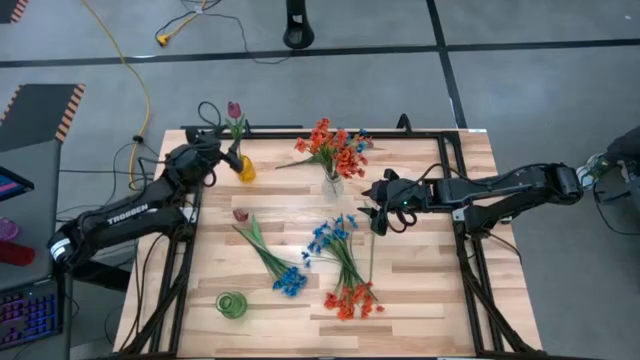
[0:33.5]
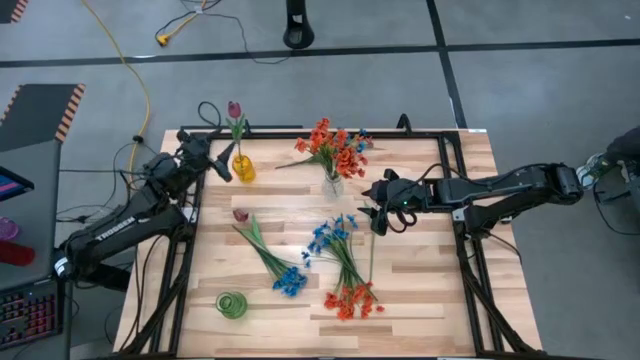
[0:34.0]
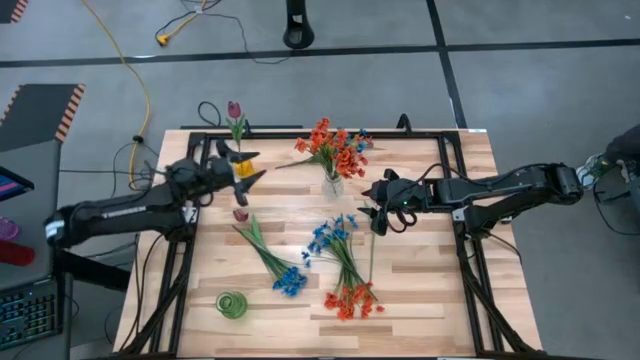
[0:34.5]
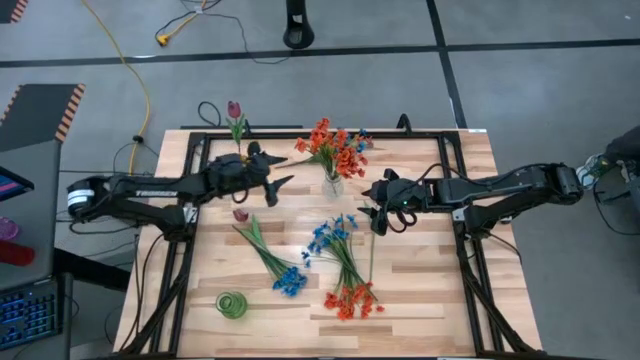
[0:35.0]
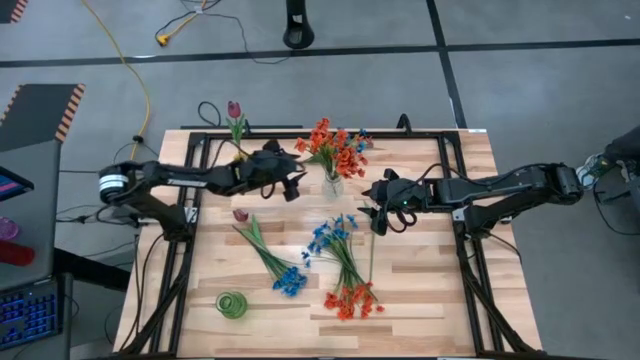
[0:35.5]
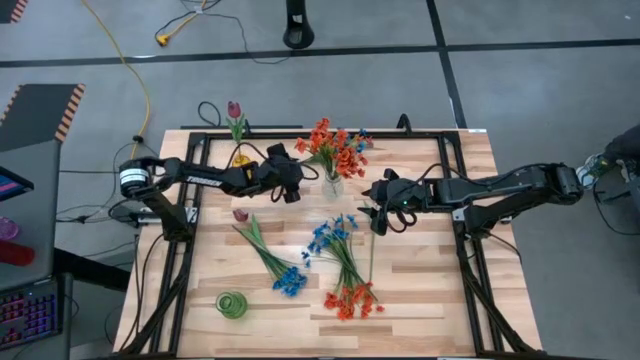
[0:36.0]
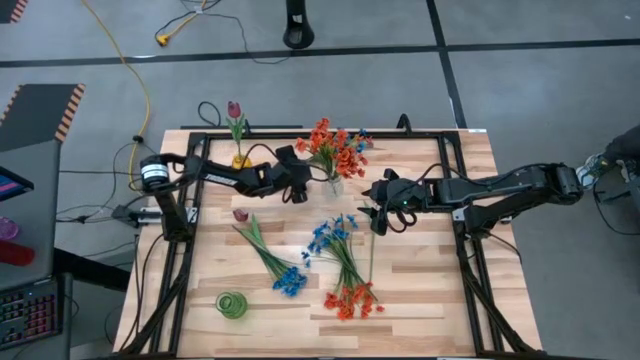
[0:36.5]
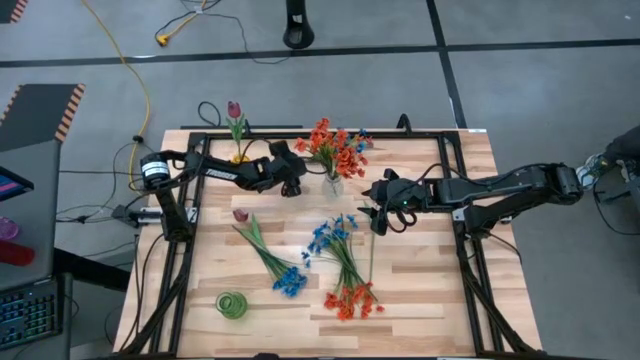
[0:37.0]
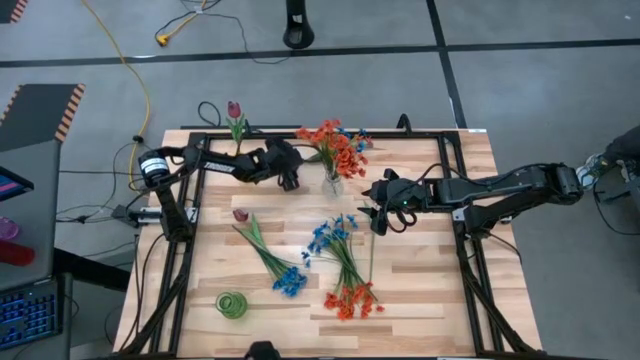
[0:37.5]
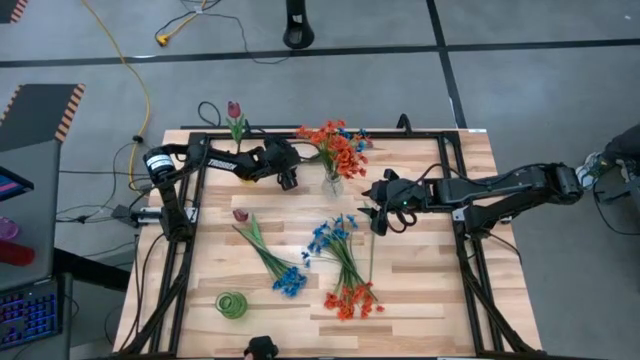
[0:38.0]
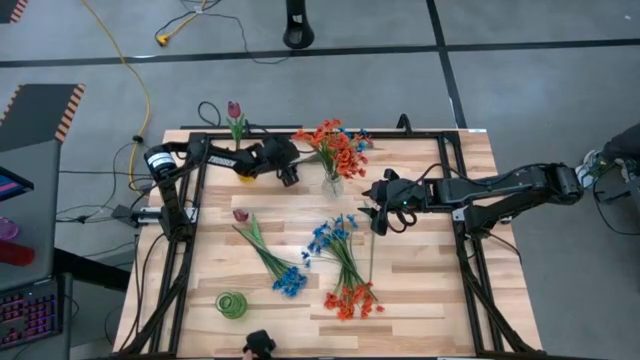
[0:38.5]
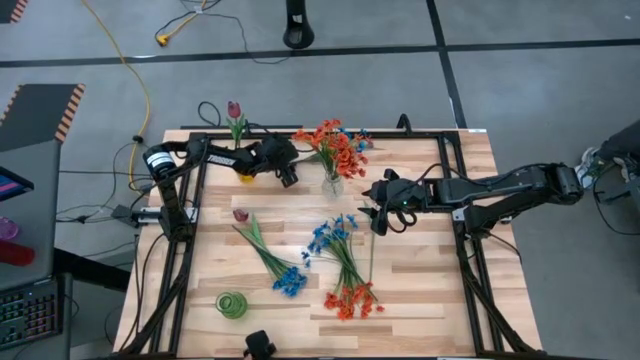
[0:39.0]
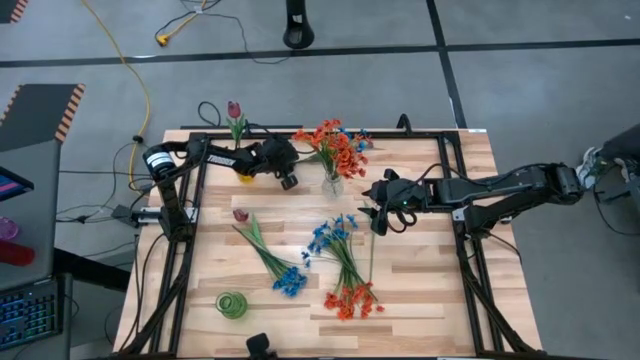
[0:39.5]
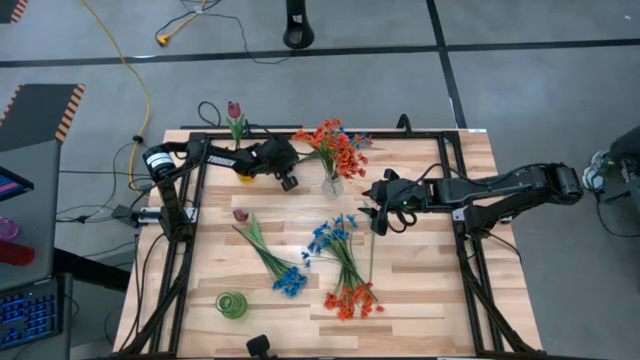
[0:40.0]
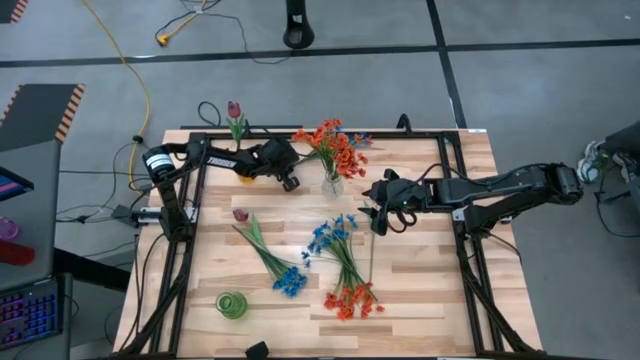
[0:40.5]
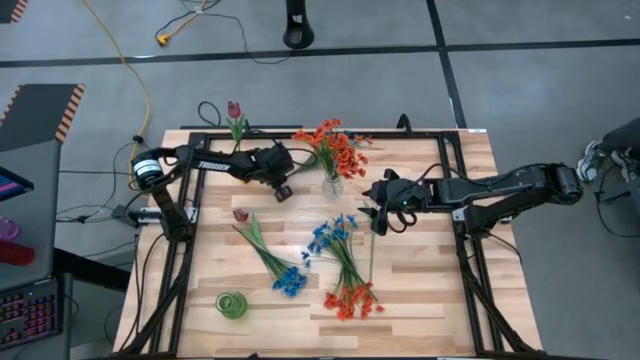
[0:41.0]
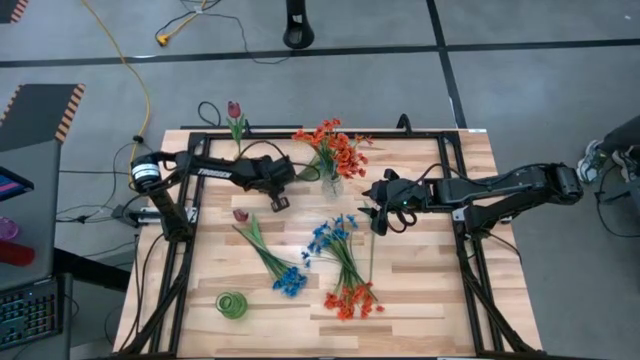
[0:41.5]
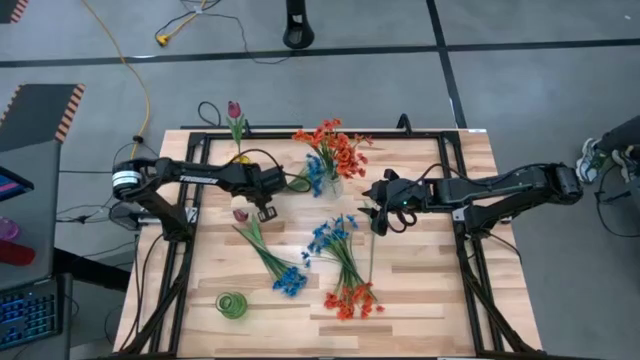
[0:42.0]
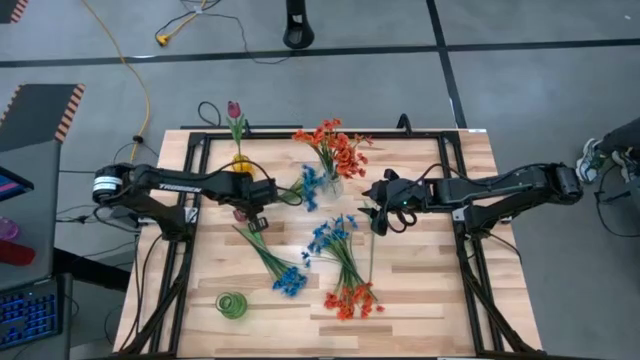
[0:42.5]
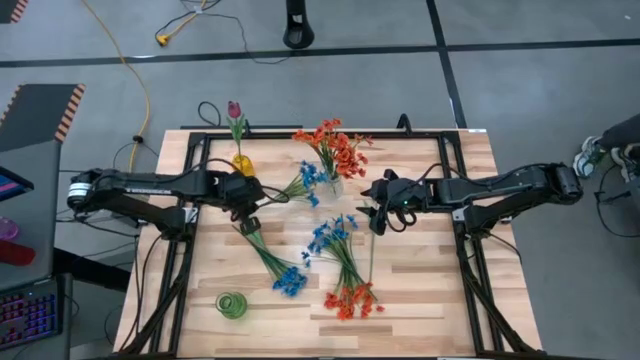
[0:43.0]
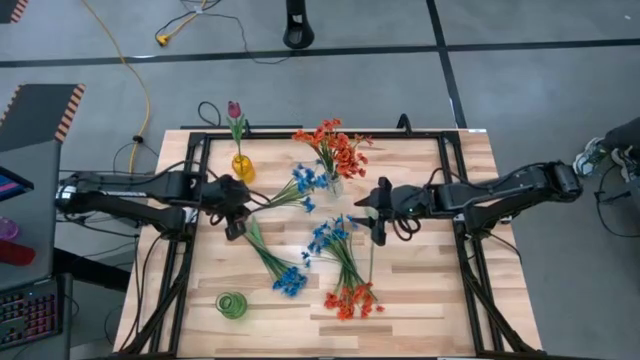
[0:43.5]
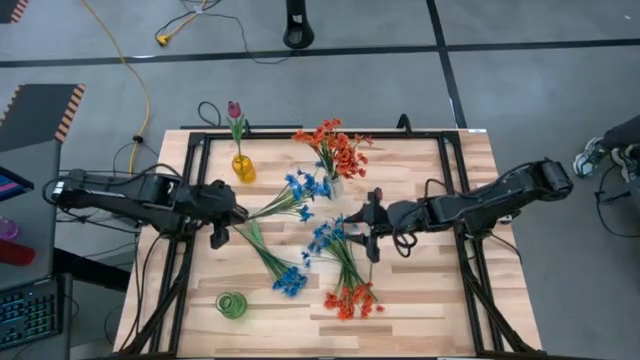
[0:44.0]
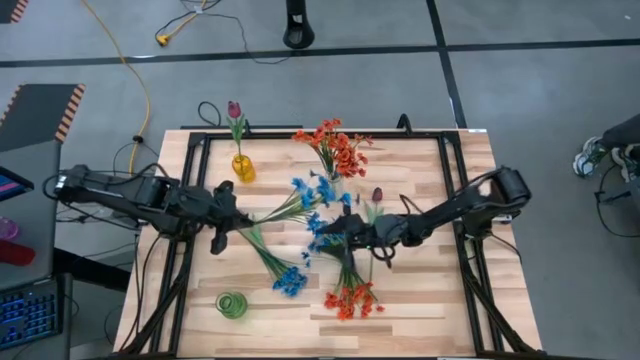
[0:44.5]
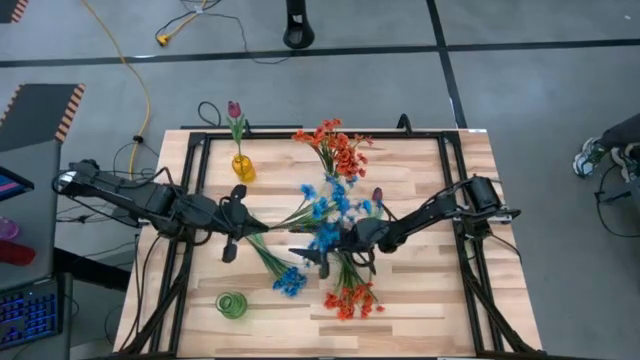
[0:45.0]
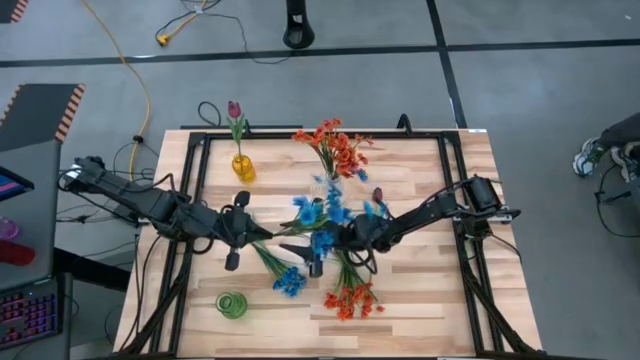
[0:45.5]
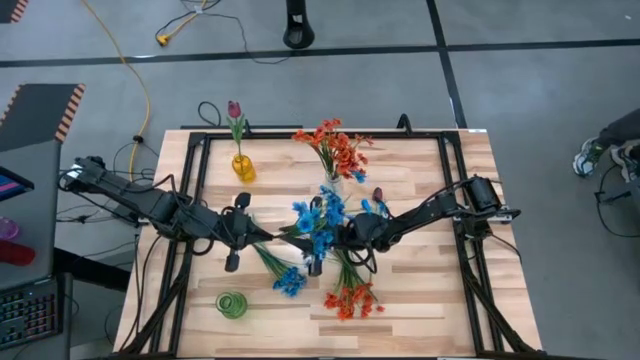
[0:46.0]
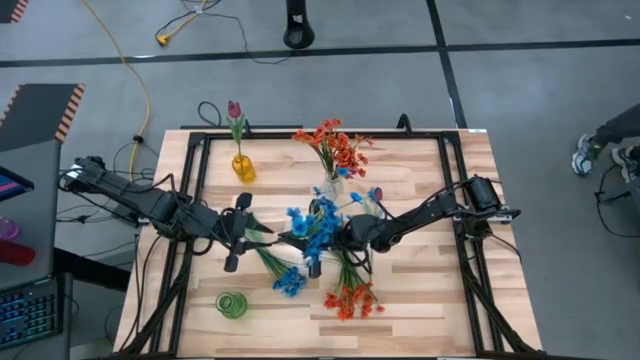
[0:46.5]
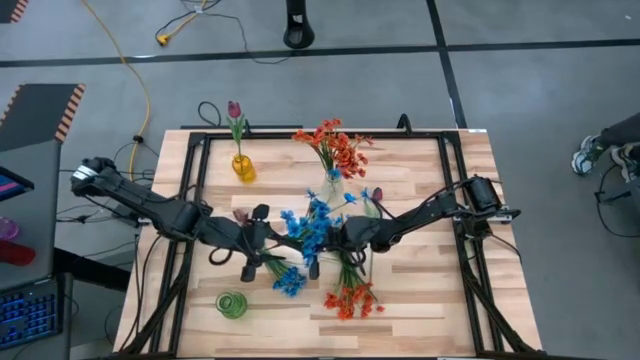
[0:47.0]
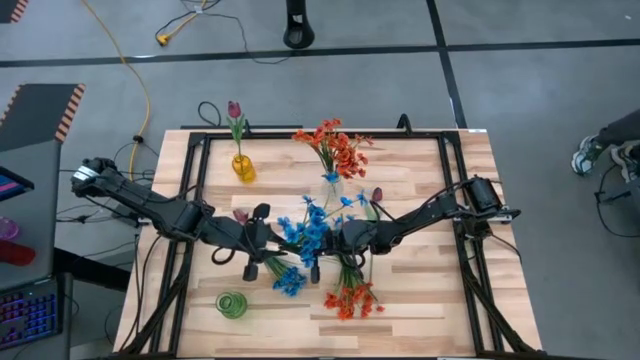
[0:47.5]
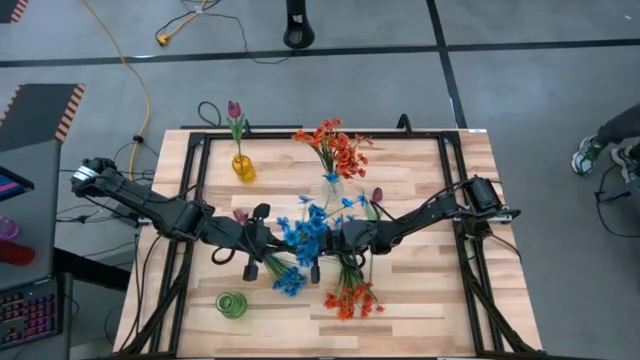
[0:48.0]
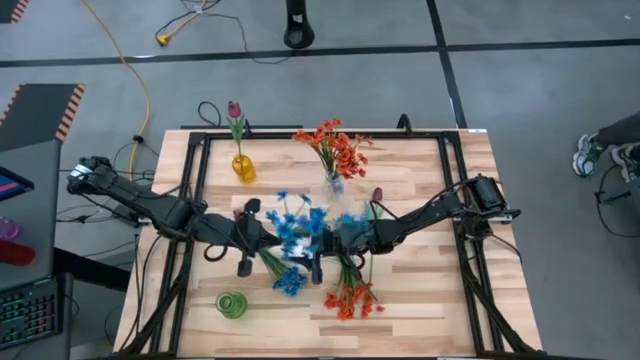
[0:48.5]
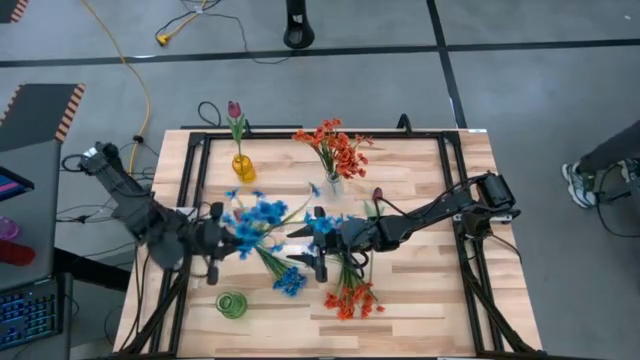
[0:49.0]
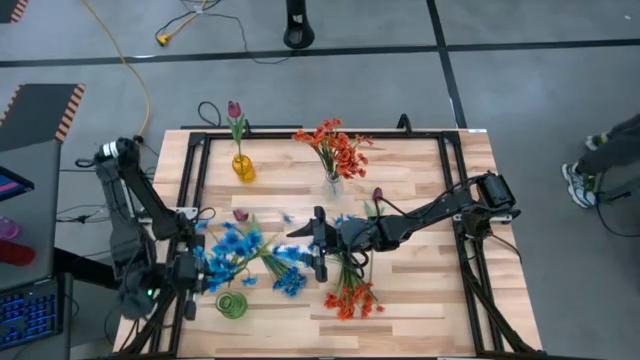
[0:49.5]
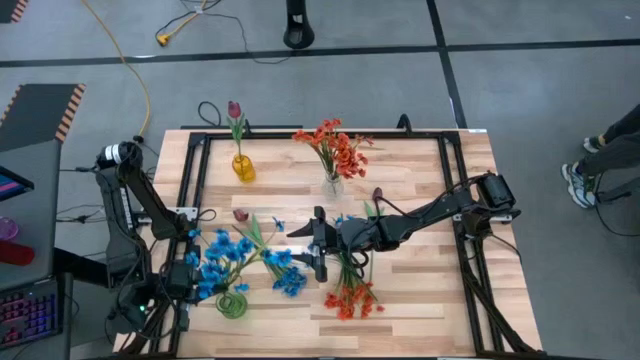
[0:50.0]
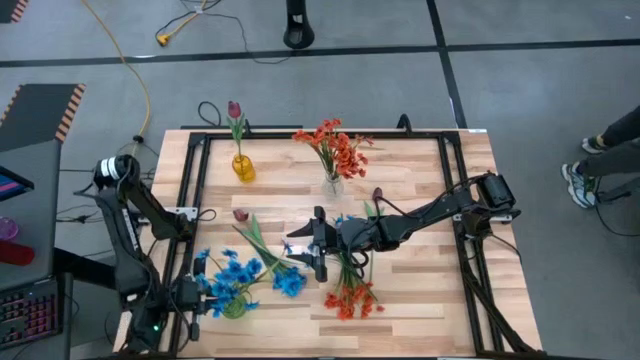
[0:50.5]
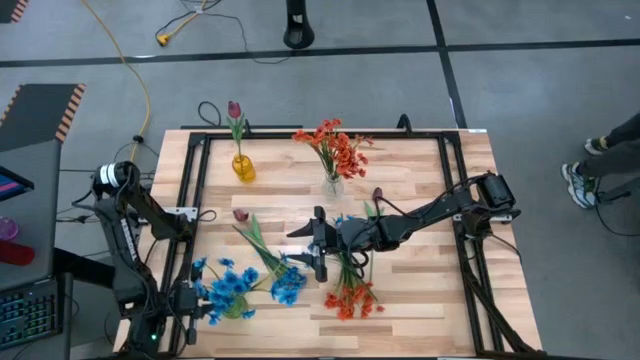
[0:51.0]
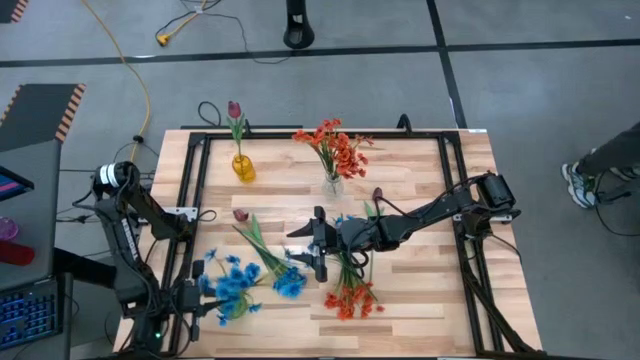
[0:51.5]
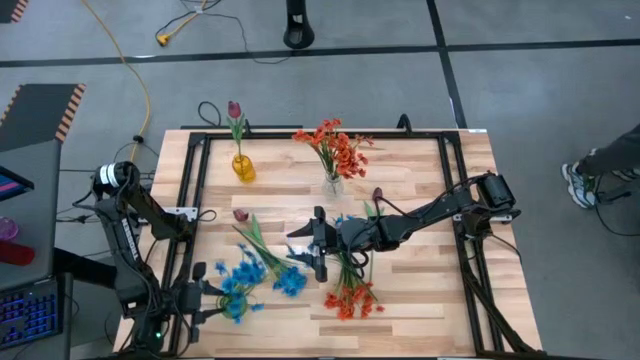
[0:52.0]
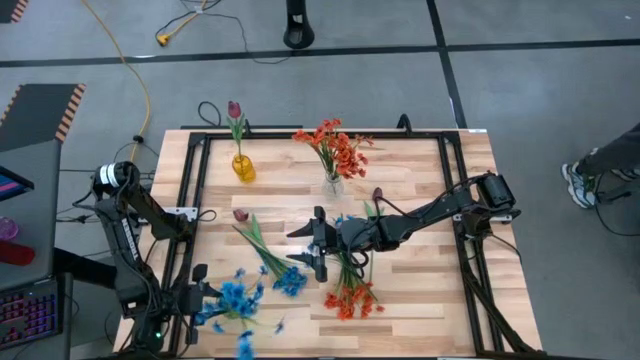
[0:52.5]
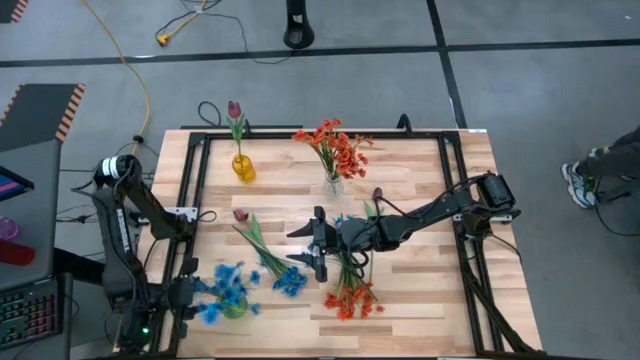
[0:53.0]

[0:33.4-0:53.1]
Task: Sort flowers into vase by color
Put the top blue flowers into the green vase

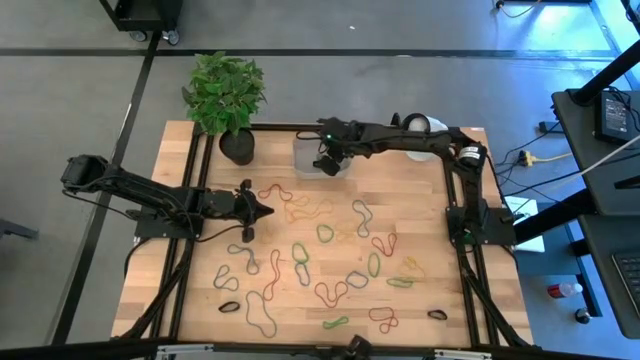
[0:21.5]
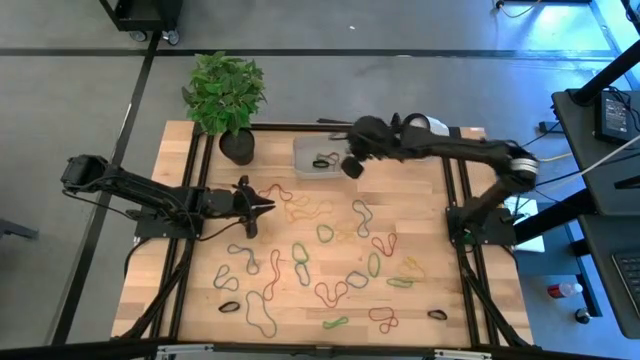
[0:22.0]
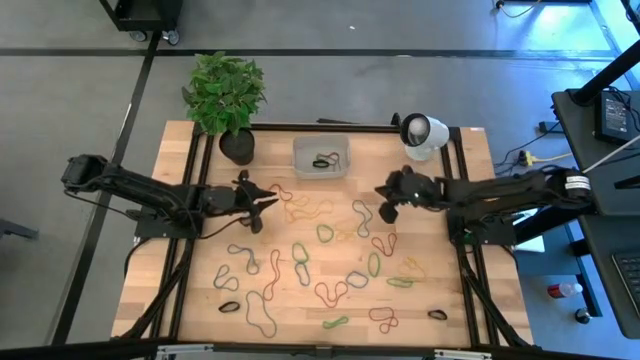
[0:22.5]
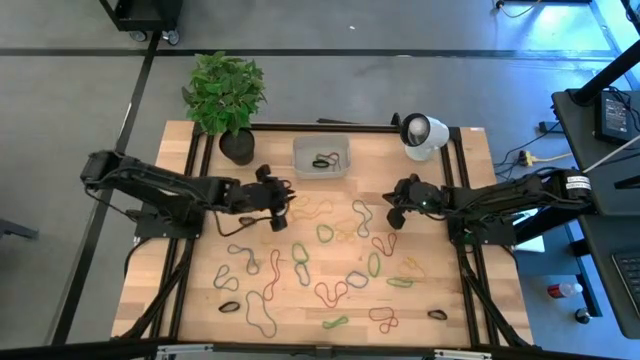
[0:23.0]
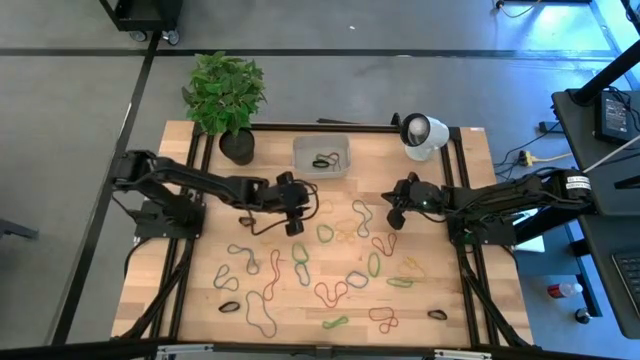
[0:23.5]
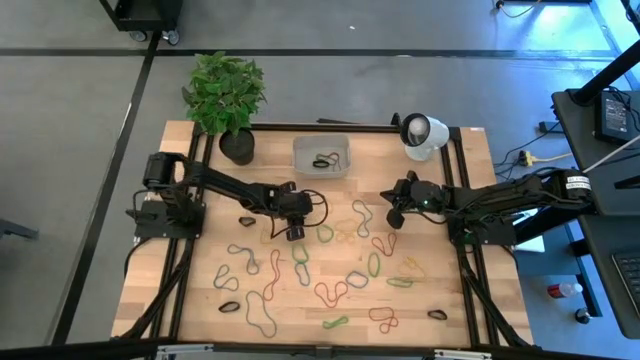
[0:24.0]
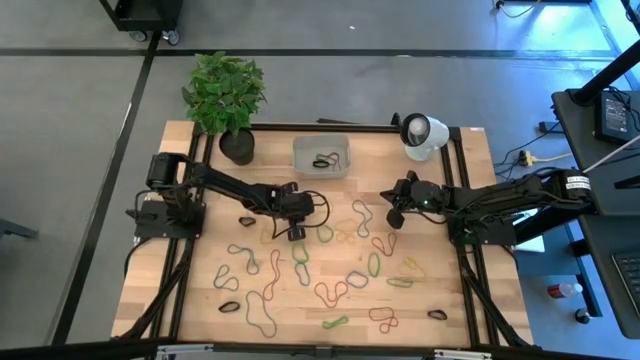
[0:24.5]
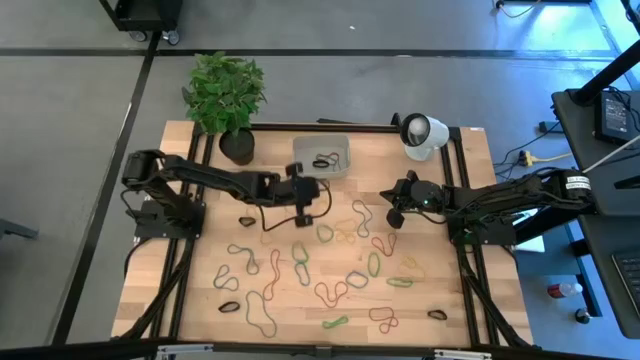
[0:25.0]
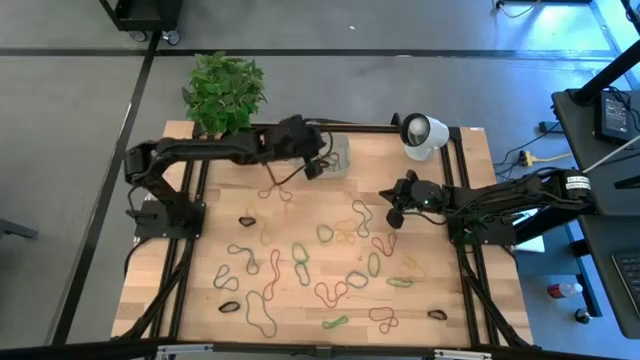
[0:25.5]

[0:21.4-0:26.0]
Task: Pick and place rubber bands into bin
Put the yellow rubber band into the gray bin
